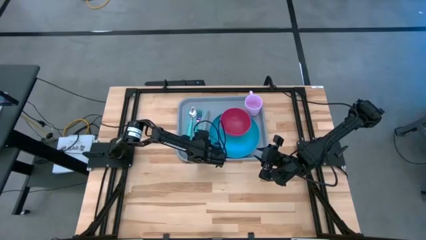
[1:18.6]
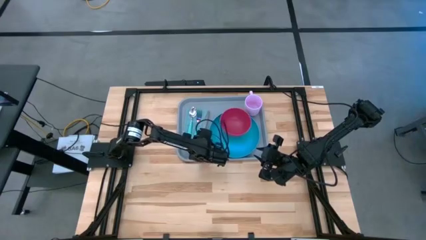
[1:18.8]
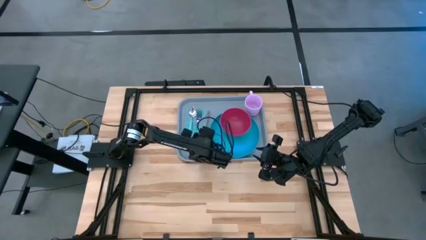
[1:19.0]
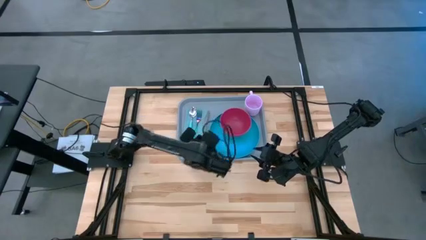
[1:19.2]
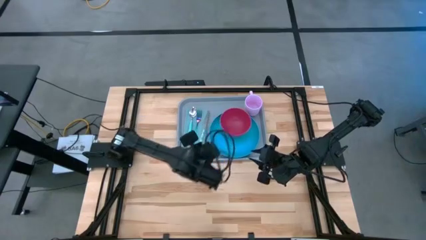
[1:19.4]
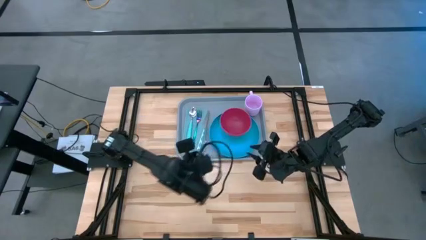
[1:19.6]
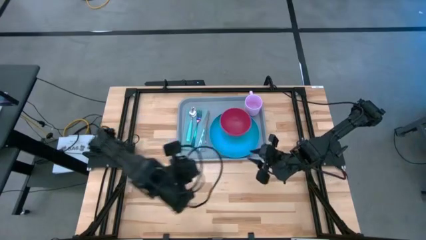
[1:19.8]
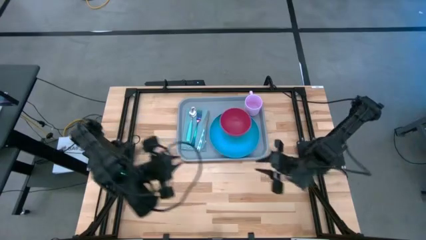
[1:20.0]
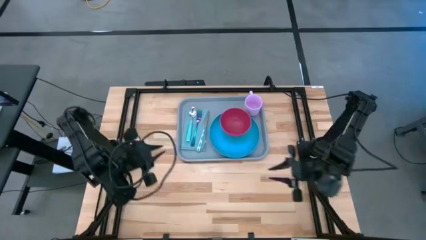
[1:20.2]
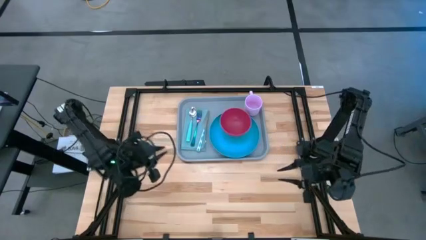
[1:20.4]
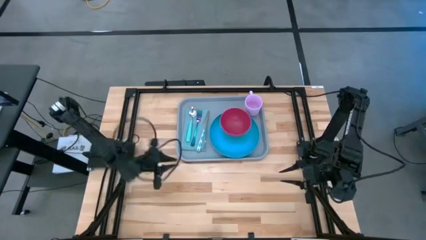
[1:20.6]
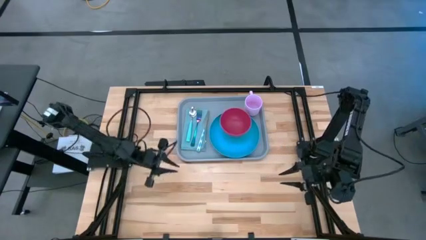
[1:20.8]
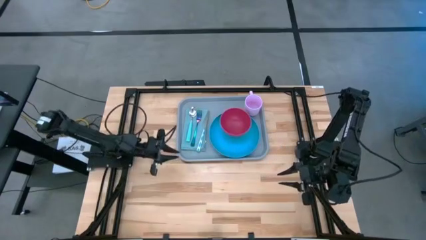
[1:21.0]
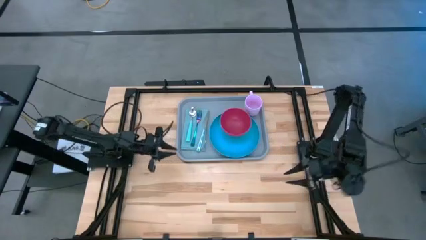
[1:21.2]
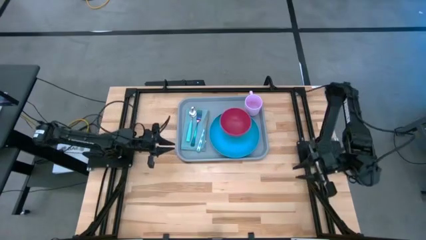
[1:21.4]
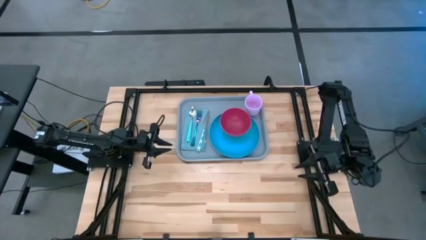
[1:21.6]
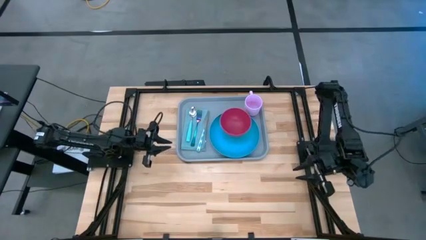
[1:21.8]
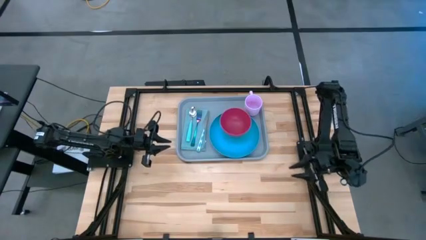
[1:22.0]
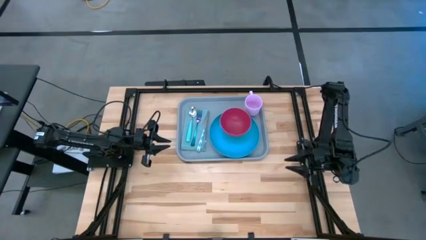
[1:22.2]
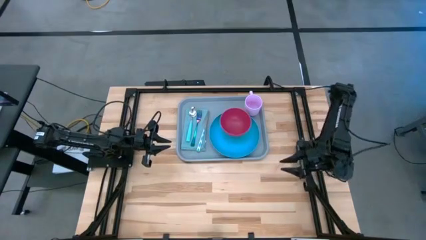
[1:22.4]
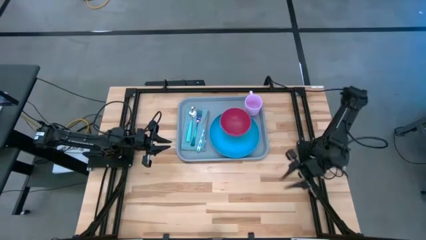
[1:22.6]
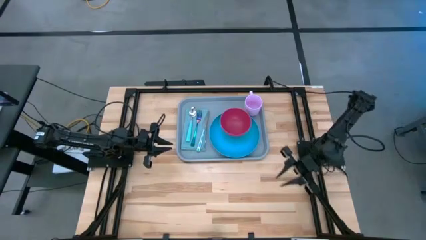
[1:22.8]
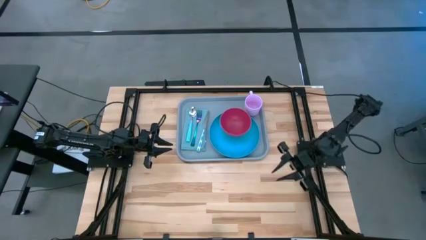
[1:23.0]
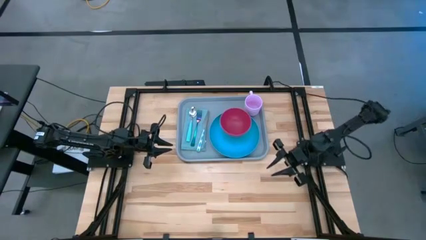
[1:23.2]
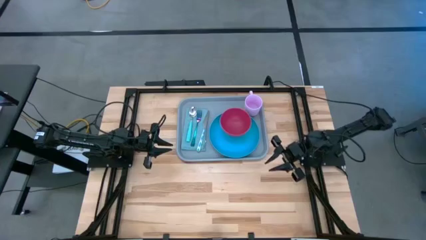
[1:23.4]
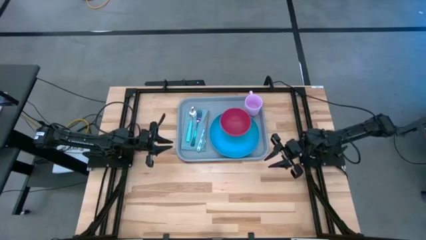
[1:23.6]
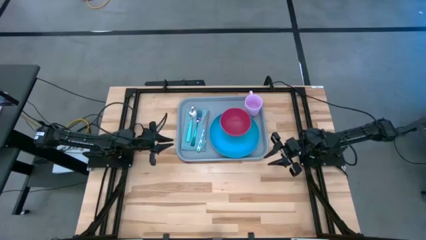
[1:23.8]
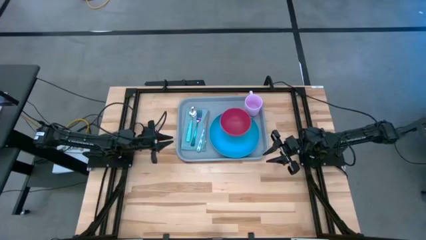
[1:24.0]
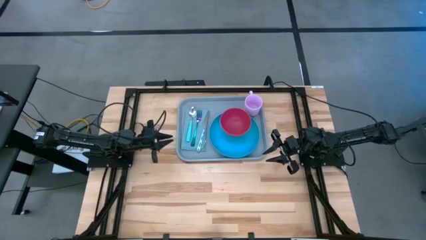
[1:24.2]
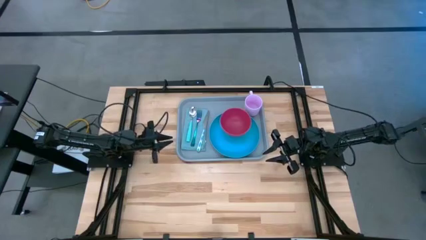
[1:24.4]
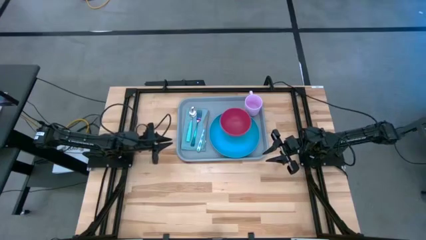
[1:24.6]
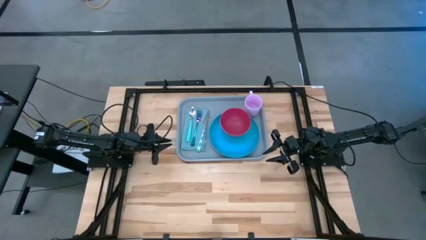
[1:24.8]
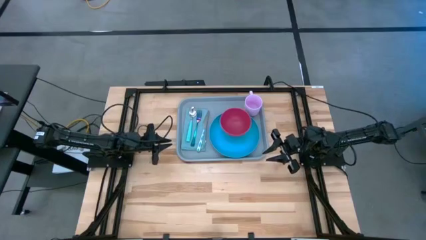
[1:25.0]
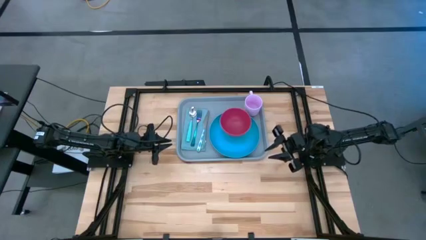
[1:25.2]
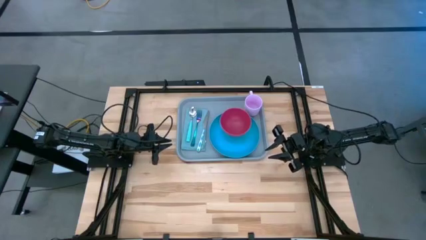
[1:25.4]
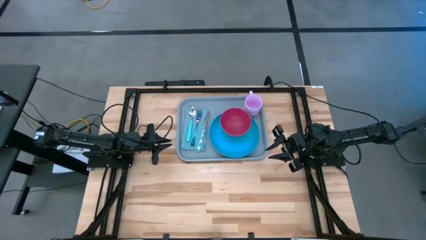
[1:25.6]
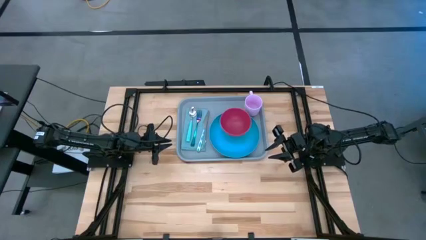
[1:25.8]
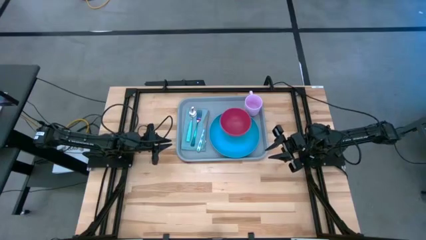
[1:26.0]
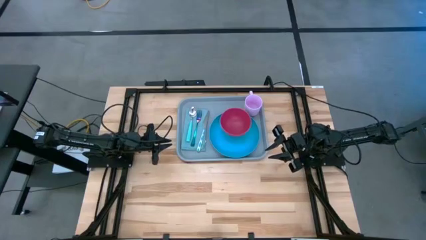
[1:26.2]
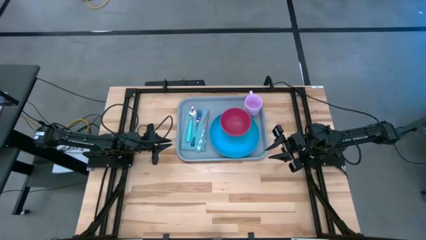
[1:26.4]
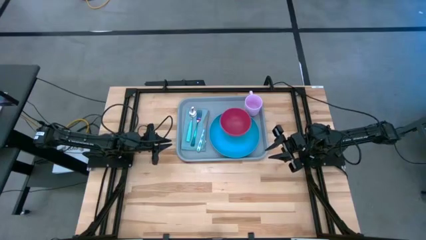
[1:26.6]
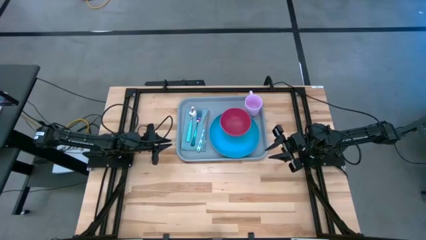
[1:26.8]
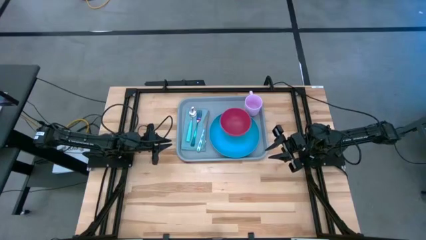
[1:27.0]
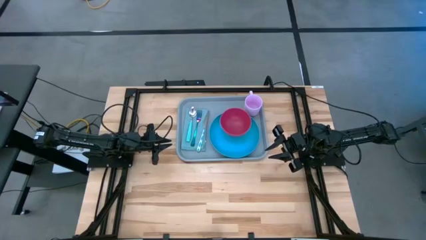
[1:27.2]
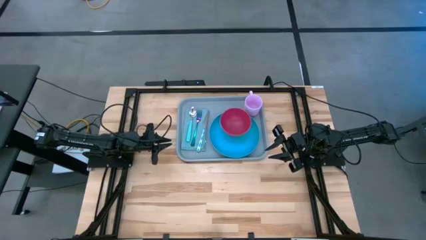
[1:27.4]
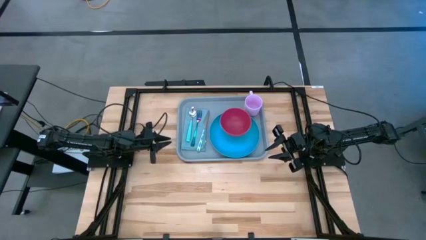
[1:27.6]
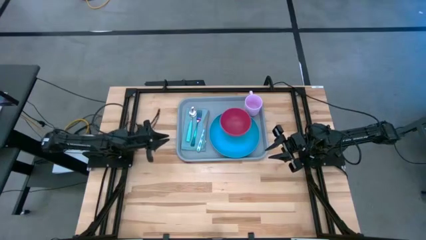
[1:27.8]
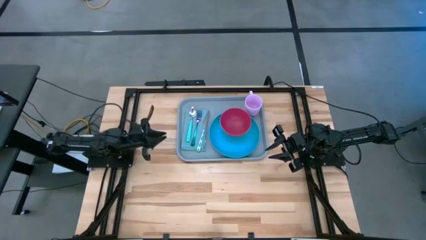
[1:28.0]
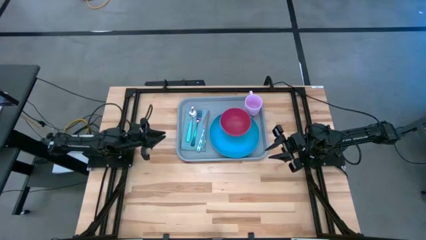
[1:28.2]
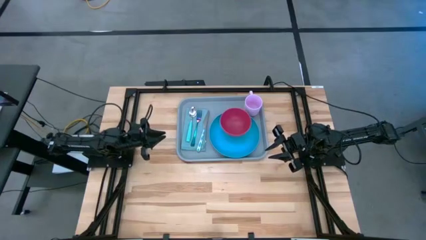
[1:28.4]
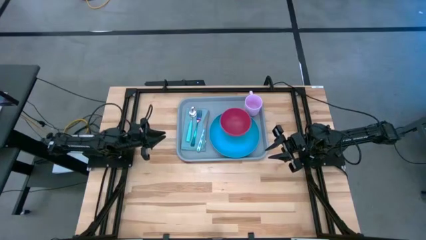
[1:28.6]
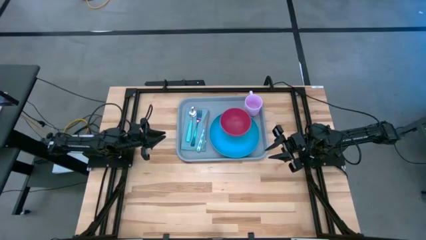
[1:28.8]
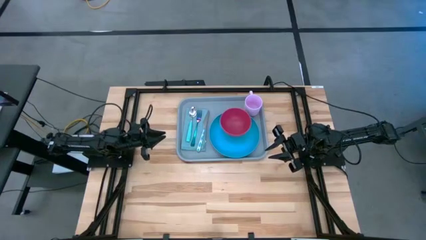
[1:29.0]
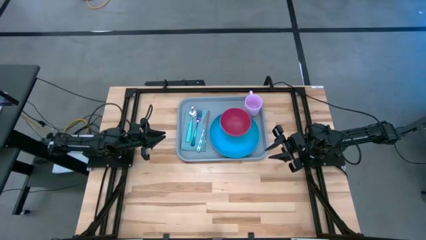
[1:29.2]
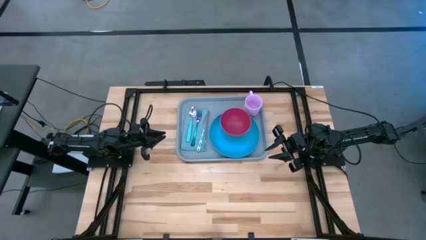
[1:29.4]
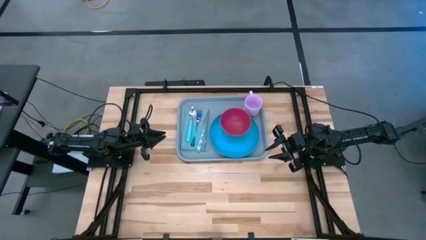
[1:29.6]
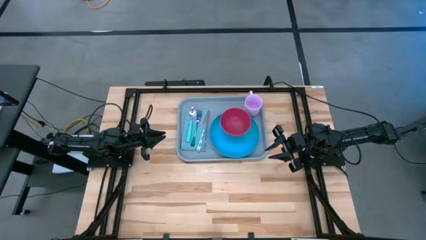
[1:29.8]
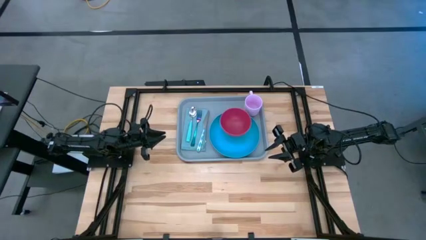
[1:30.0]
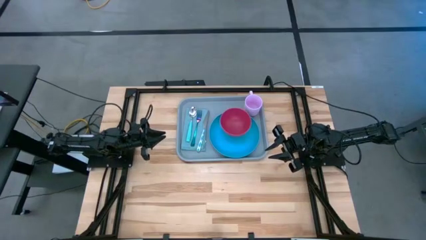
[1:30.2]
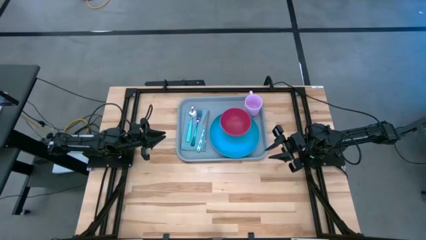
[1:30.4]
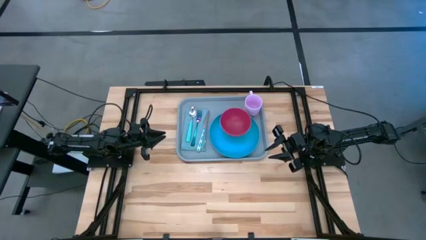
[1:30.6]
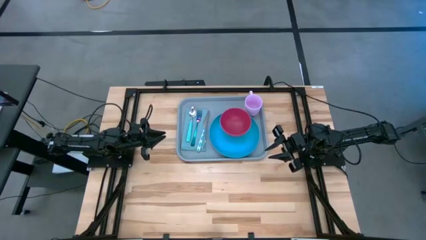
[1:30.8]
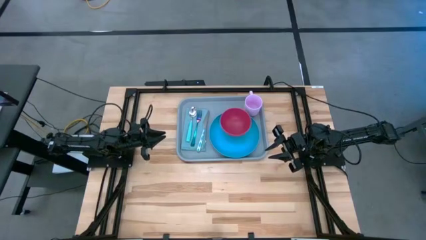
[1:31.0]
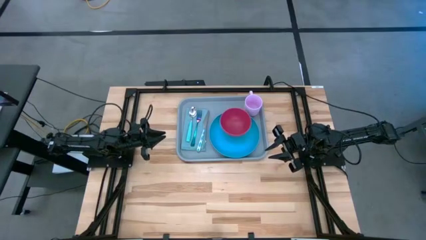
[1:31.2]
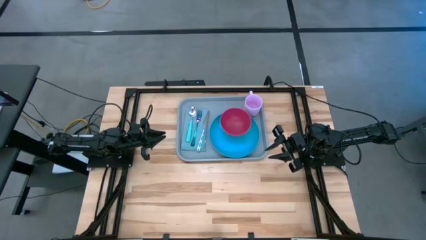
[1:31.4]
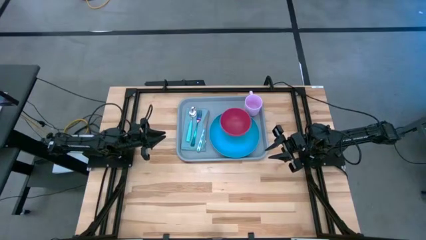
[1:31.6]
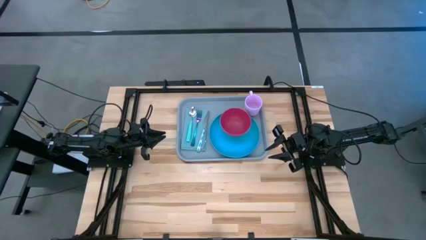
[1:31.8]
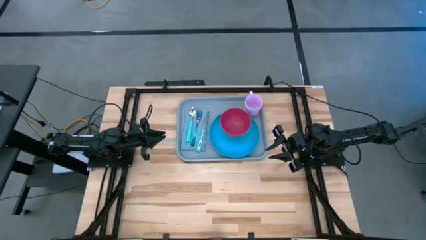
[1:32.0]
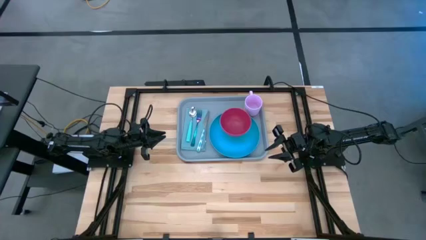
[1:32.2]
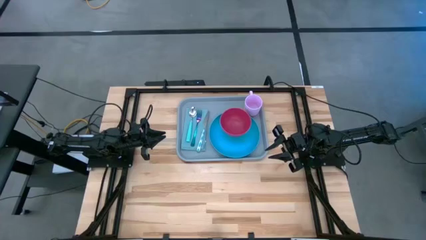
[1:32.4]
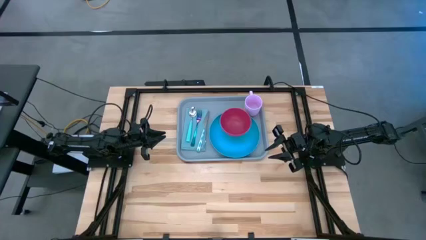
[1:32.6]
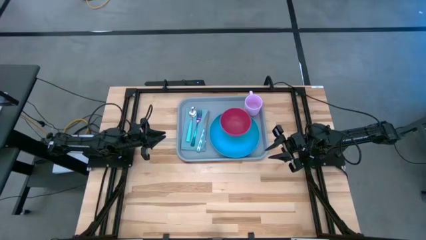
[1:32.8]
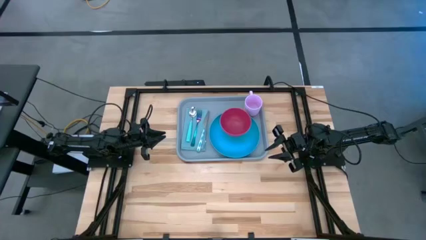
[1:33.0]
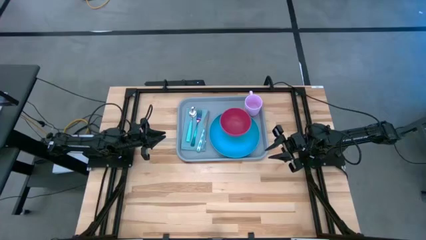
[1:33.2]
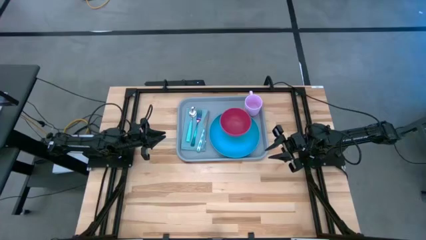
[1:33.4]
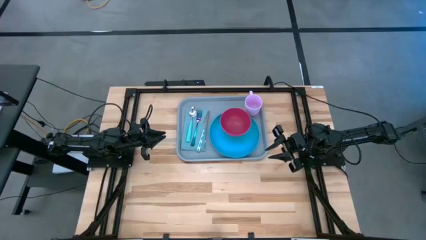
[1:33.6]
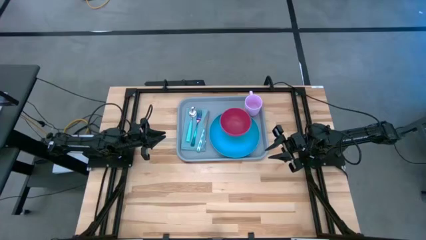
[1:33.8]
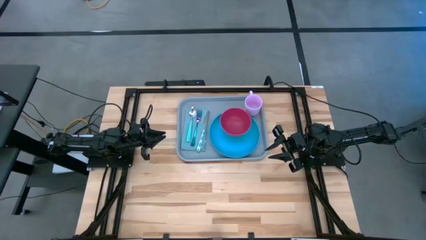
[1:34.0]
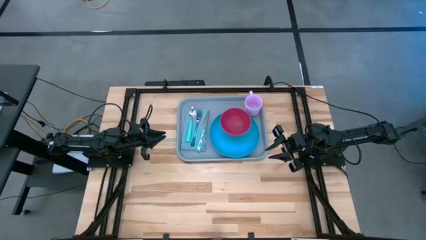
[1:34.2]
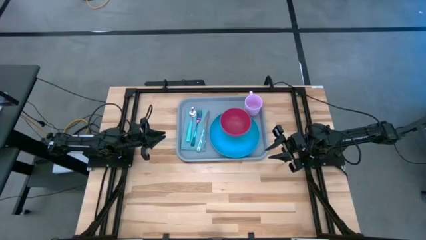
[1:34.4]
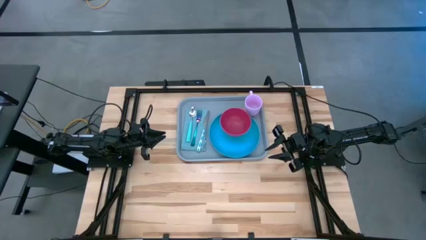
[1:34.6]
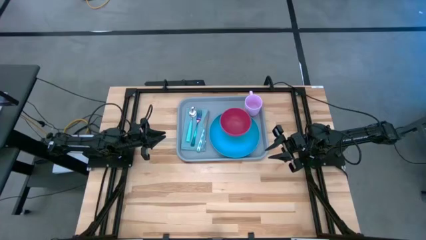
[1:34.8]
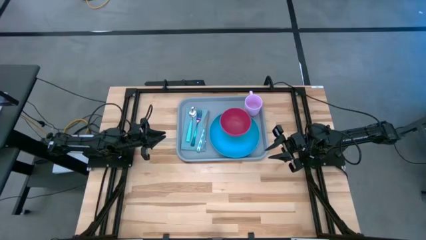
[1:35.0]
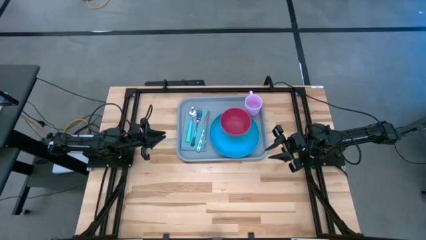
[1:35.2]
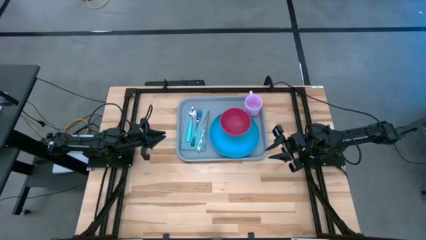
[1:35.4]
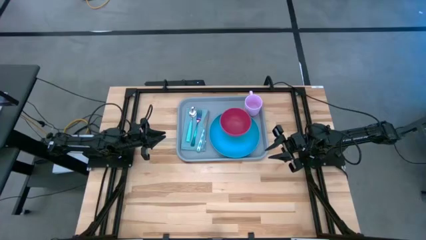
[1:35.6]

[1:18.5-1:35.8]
Task: Set up tray
Return to Home Position
